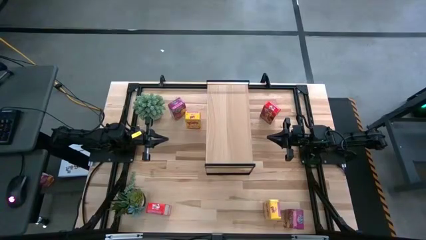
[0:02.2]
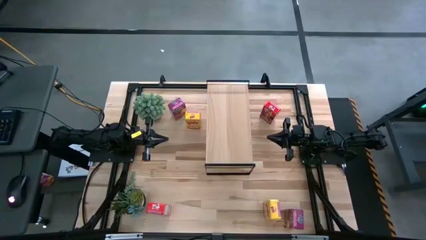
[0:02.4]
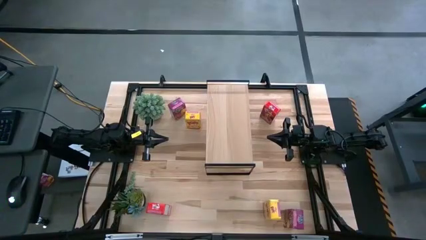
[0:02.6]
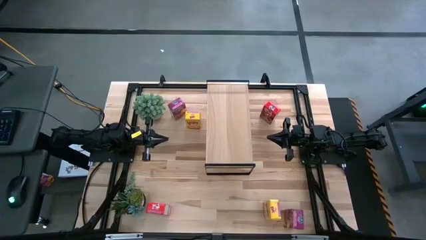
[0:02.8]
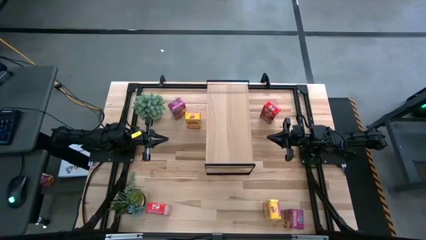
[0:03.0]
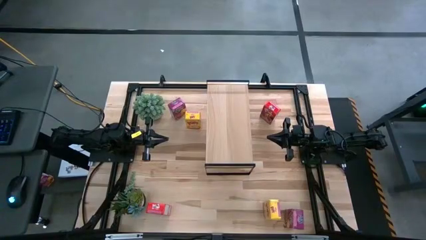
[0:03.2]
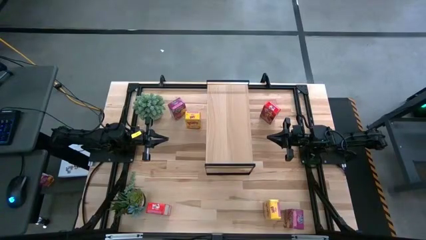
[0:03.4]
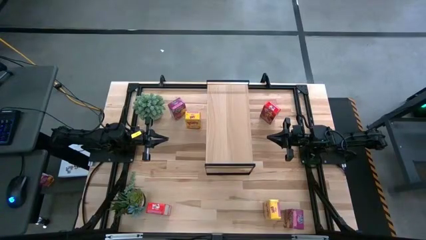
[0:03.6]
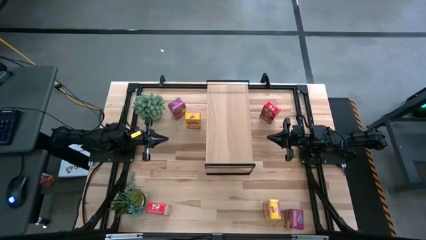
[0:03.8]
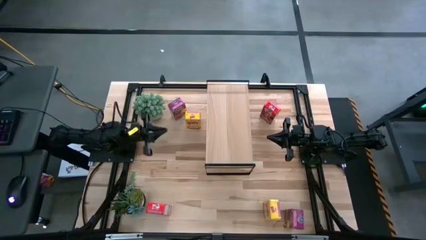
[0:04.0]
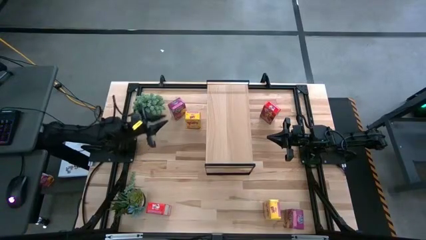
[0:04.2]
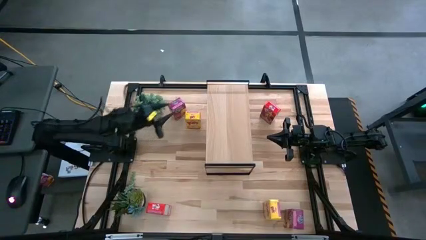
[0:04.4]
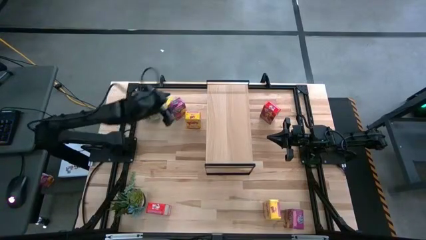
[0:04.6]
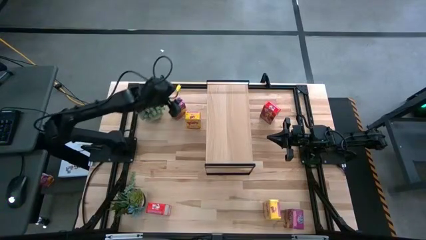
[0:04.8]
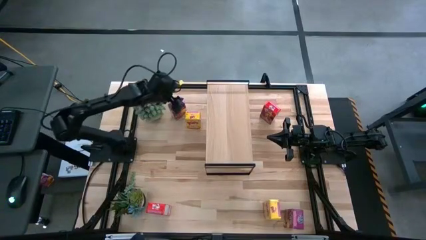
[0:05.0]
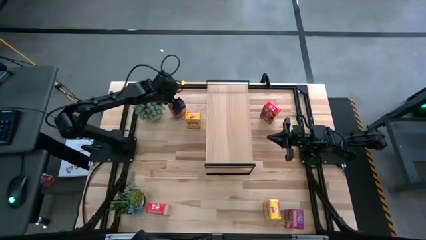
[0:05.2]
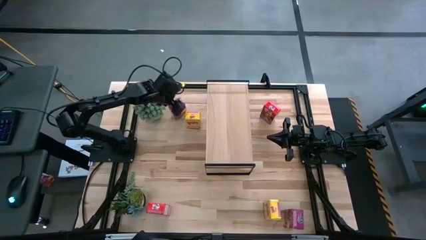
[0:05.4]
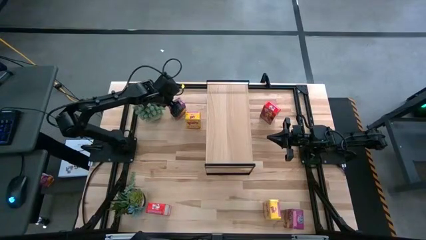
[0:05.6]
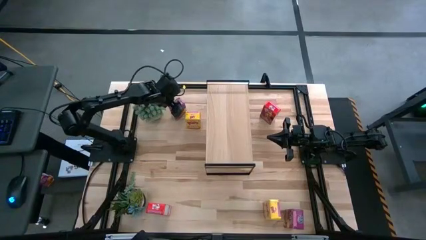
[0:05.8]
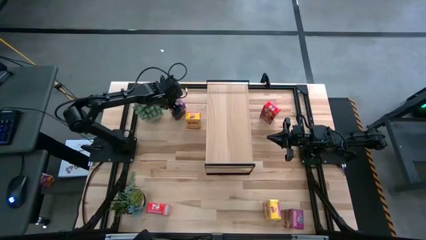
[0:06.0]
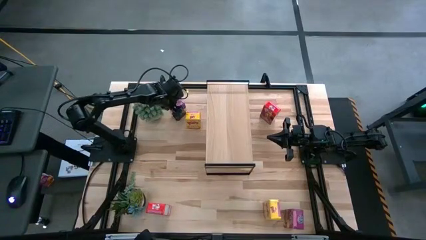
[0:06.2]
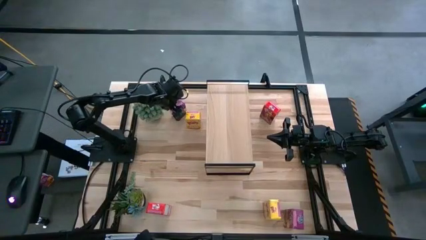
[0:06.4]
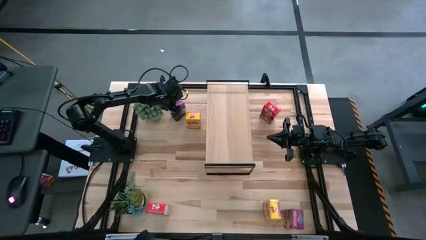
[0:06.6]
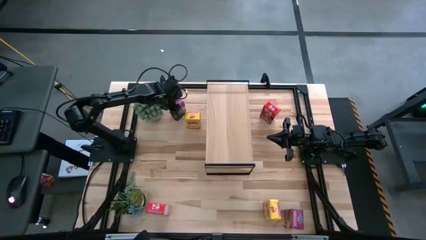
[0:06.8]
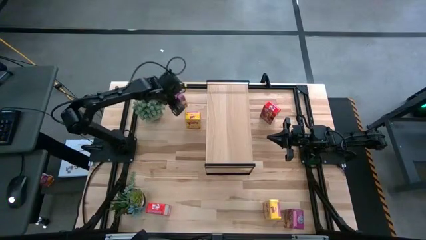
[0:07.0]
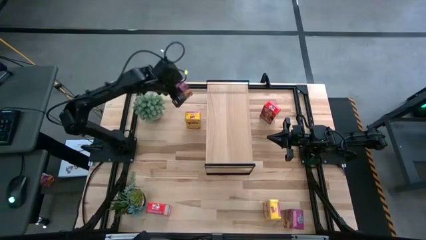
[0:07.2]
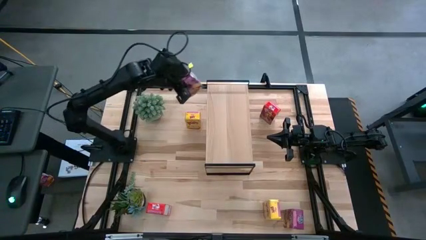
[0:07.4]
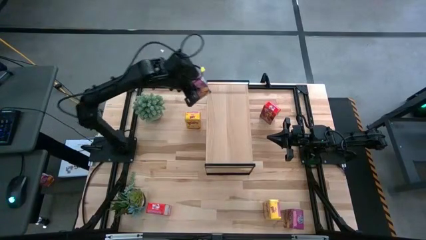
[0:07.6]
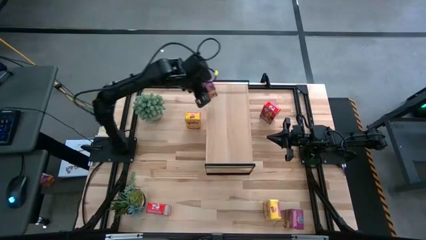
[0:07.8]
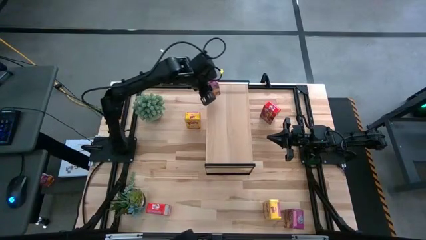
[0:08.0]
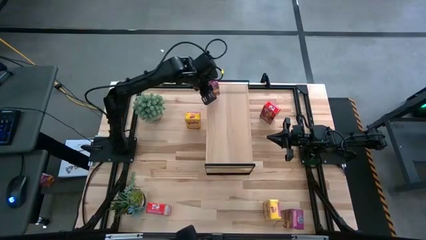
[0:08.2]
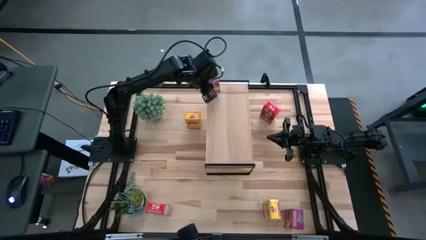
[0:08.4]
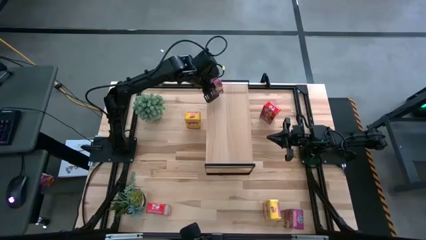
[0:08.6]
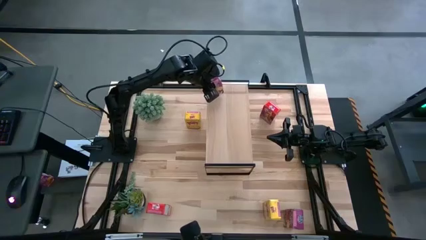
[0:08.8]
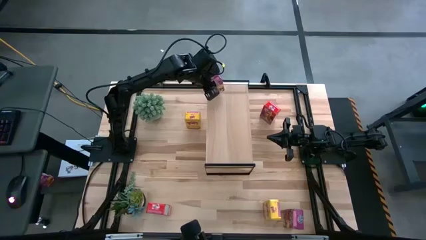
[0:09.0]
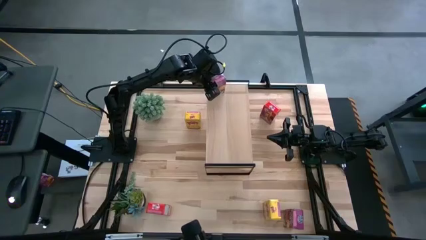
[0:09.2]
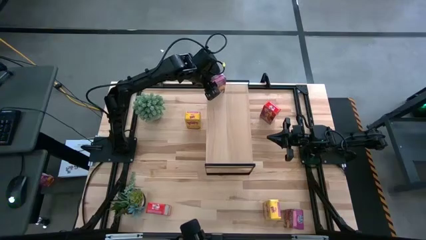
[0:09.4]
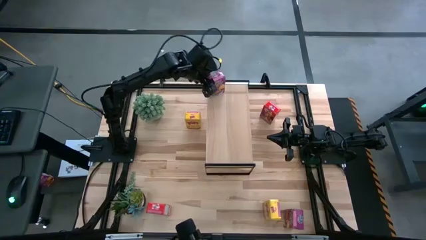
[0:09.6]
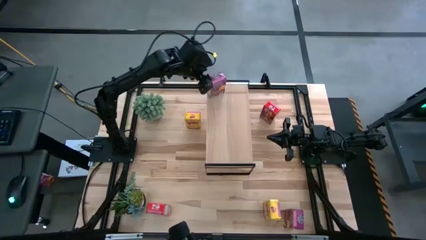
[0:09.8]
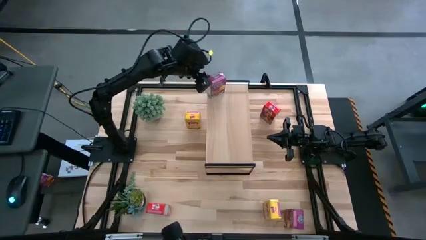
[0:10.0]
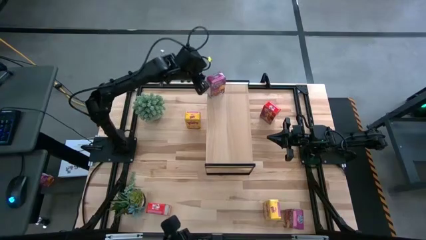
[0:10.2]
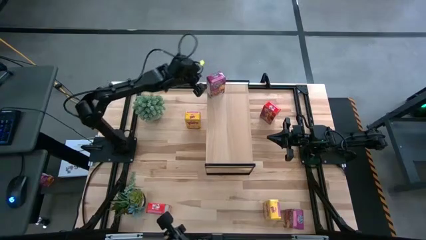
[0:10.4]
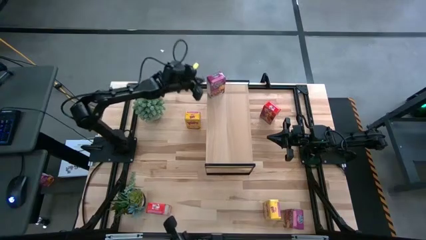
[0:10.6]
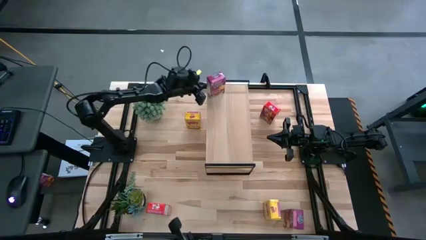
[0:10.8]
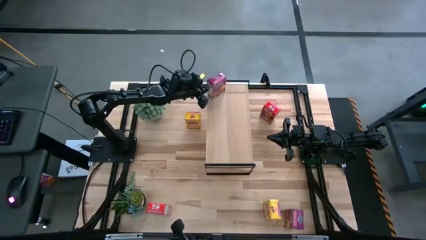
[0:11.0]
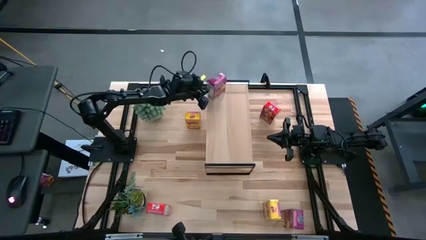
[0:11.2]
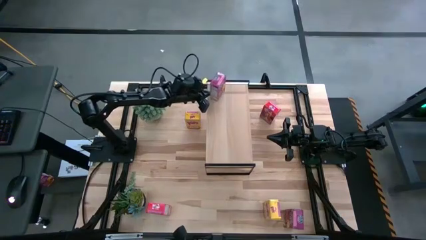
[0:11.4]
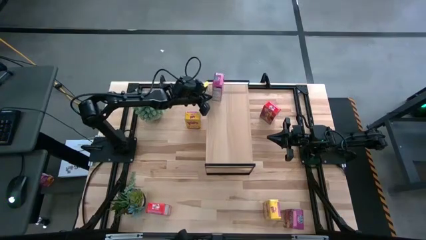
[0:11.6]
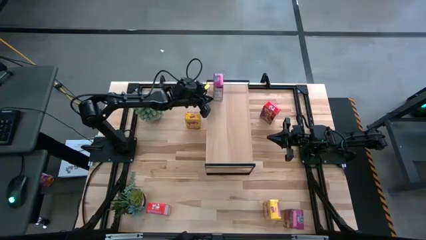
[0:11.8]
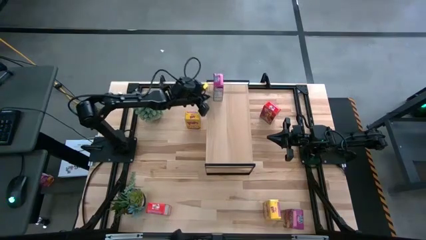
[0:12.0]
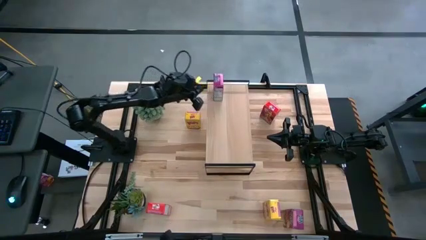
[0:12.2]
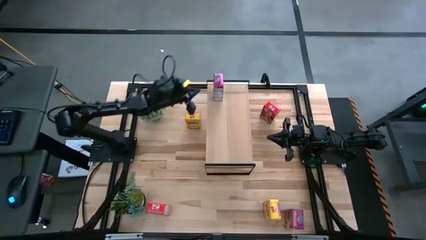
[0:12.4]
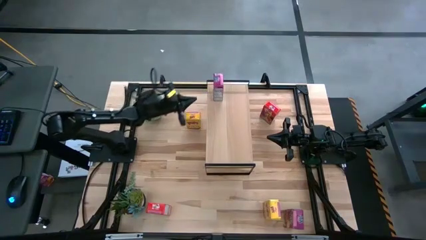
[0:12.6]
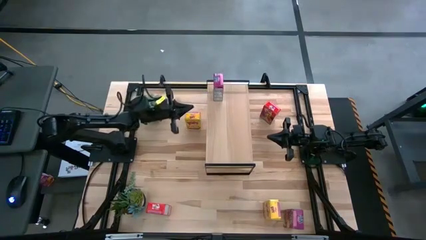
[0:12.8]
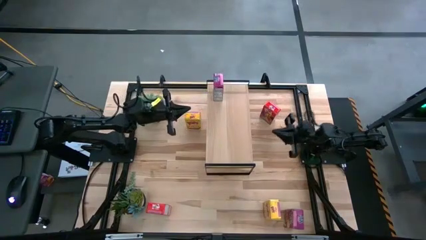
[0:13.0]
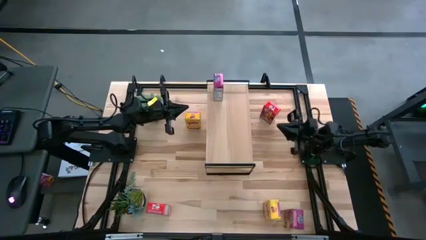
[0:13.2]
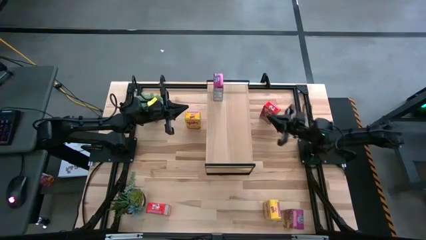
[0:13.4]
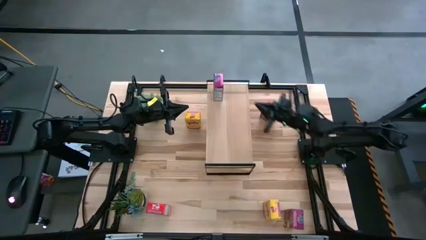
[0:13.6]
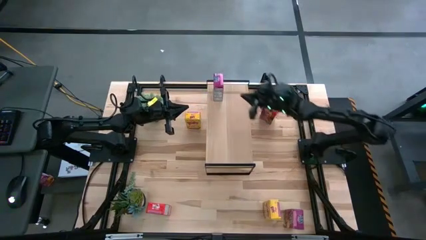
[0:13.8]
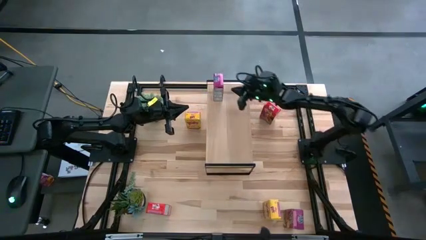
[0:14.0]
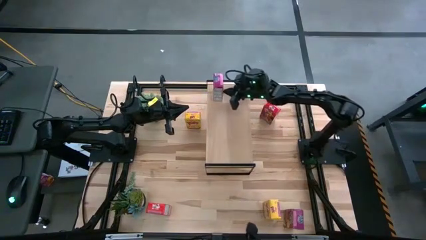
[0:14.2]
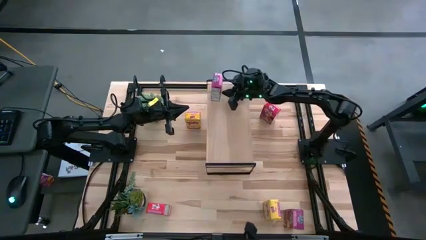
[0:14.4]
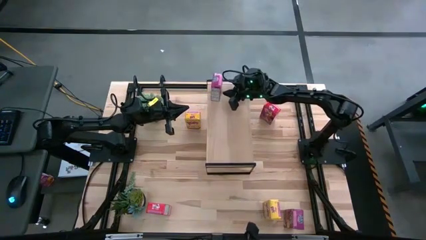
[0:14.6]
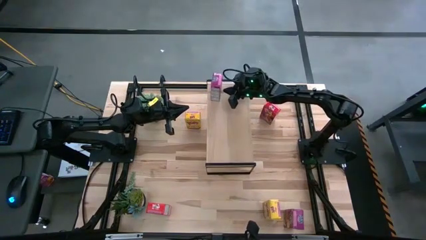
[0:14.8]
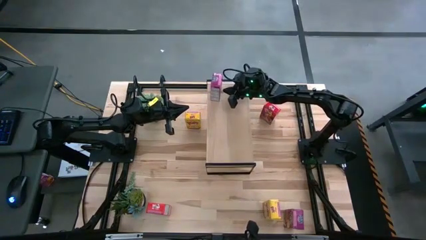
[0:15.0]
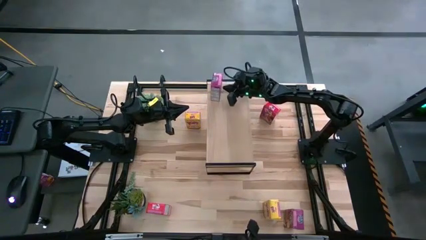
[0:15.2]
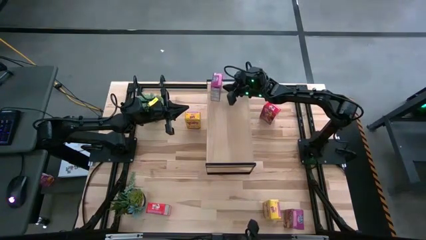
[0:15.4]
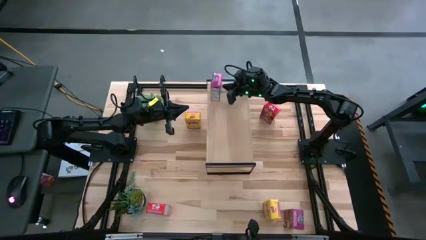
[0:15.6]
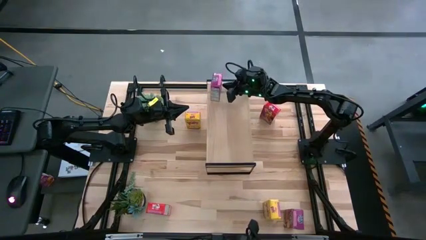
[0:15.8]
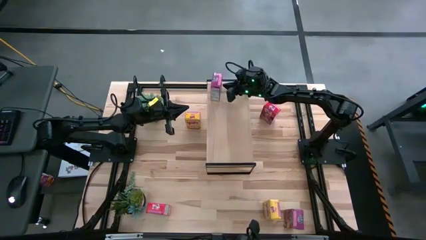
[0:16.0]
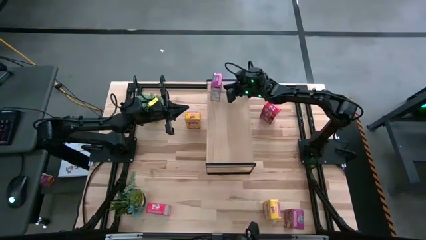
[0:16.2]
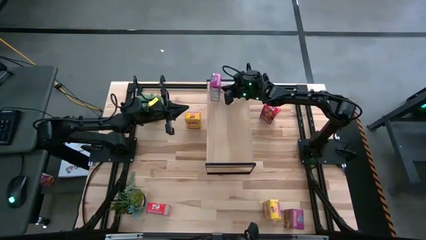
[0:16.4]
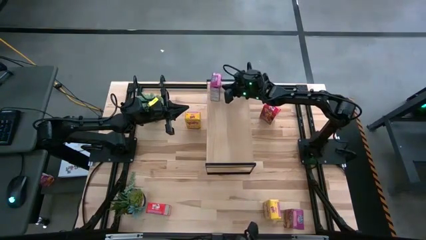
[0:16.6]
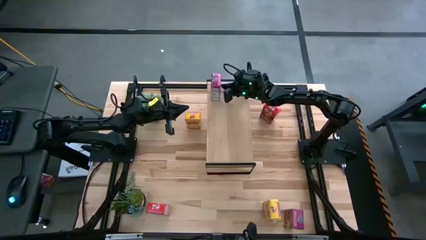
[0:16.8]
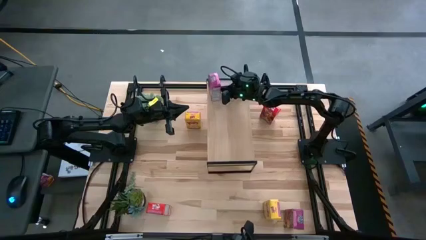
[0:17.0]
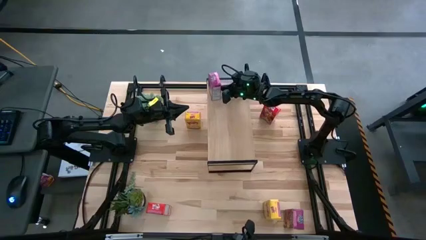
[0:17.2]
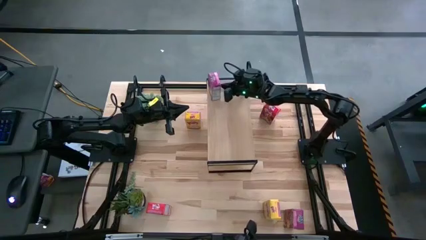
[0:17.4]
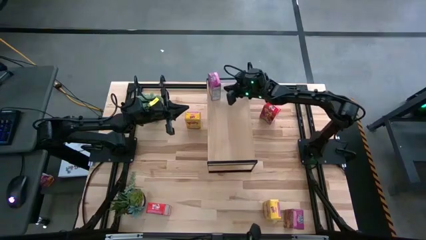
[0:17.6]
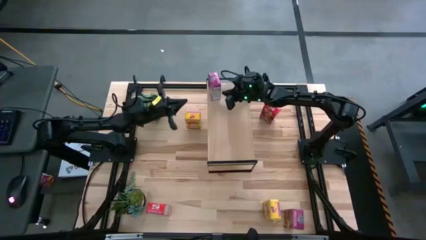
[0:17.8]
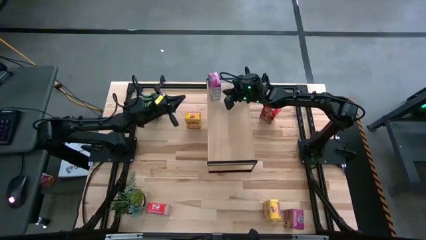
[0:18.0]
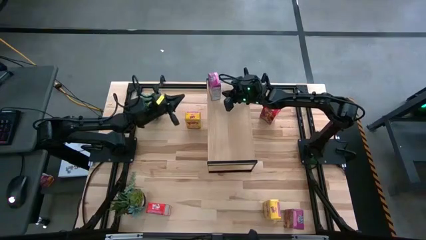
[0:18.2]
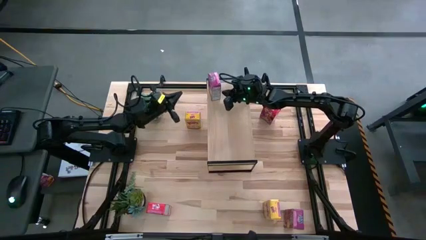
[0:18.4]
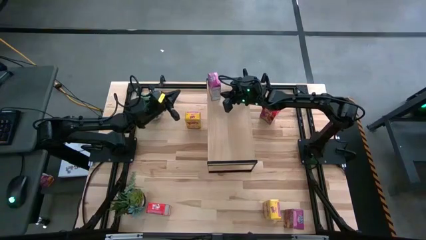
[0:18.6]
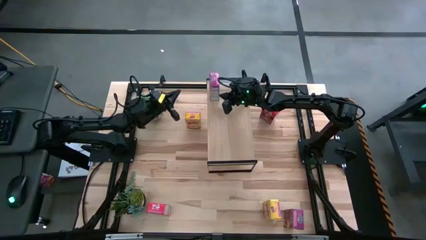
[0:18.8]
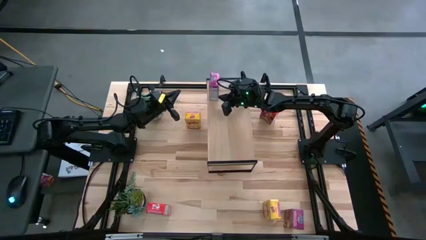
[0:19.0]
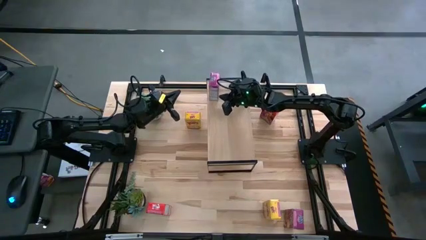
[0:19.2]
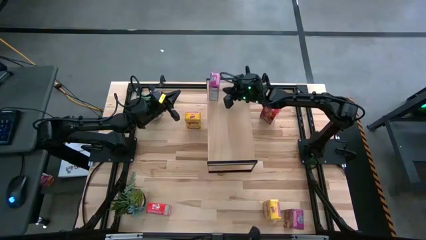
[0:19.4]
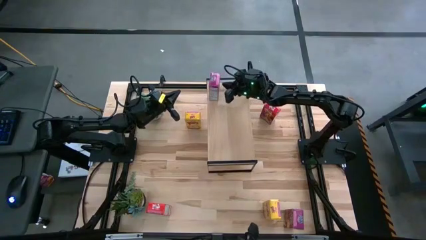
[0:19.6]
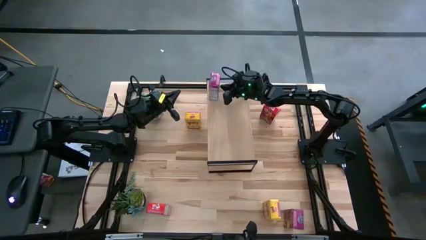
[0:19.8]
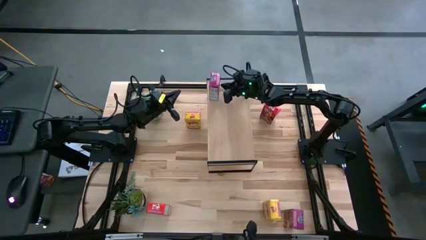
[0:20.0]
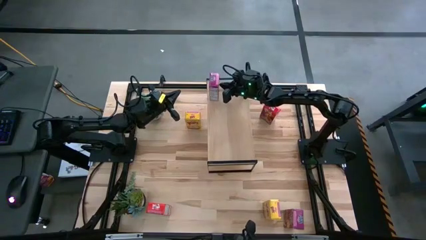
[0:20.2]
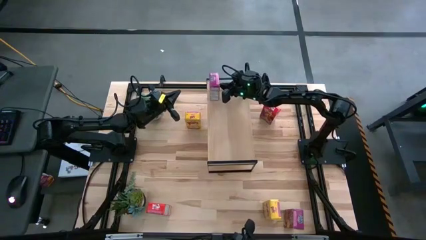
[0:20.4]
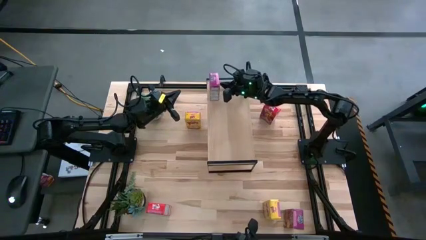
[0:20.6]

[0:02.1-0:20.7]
Task: Stack cereal on shelf
Put the top violet cereal box on the shelf
